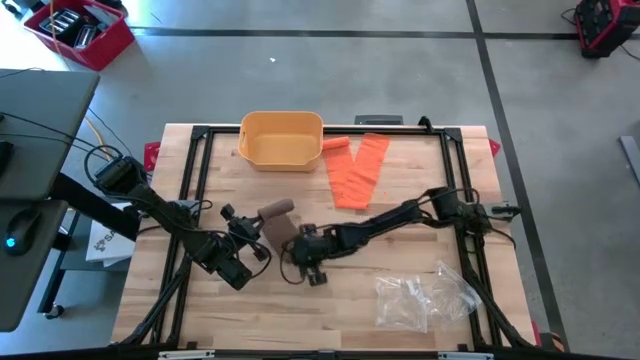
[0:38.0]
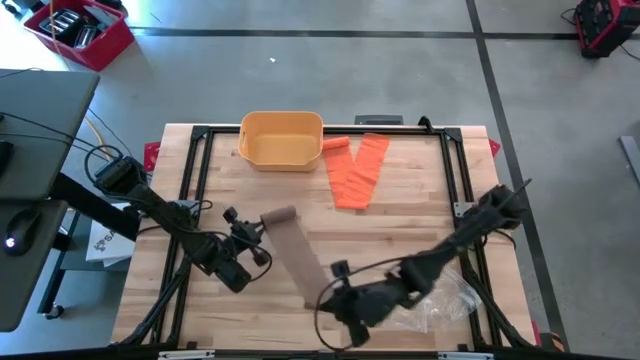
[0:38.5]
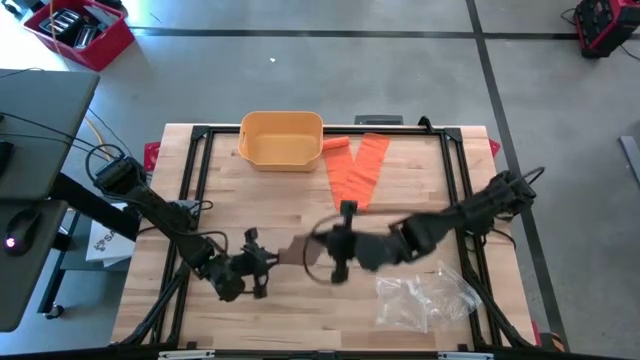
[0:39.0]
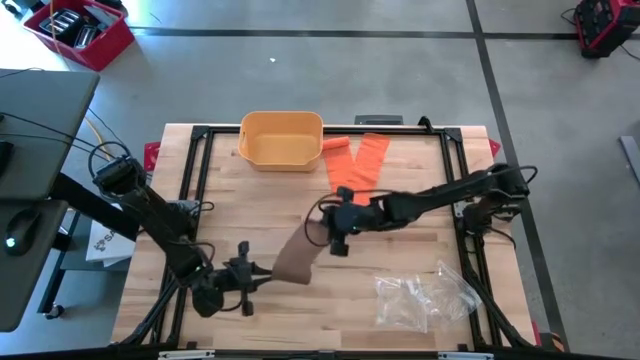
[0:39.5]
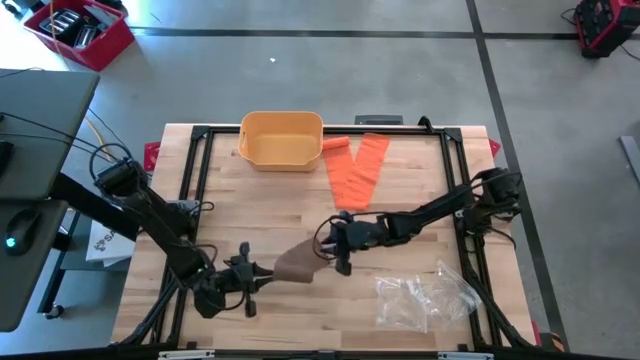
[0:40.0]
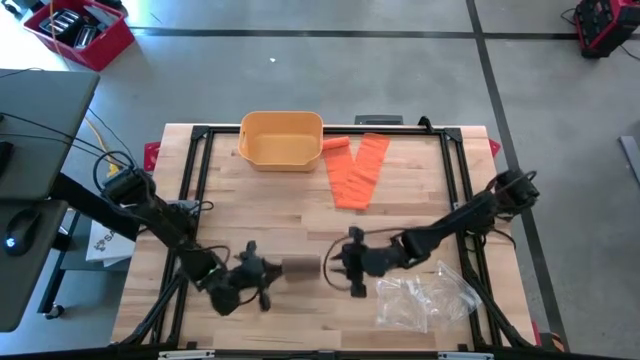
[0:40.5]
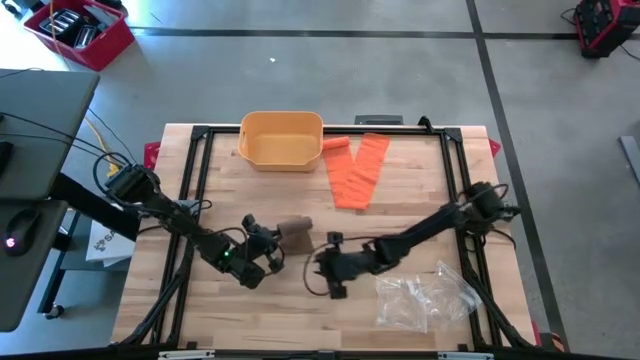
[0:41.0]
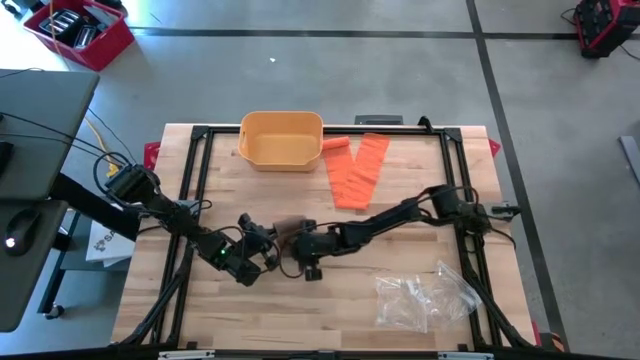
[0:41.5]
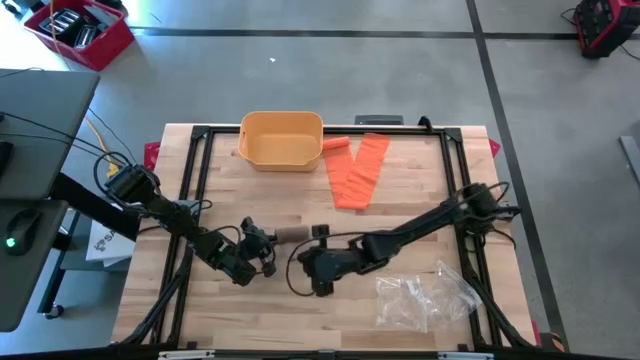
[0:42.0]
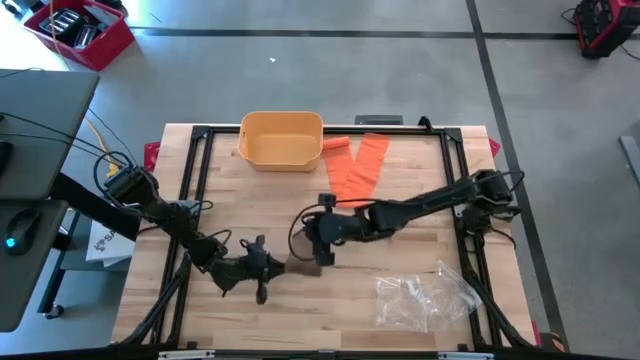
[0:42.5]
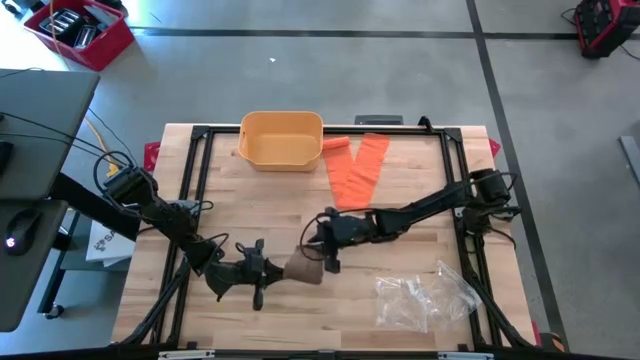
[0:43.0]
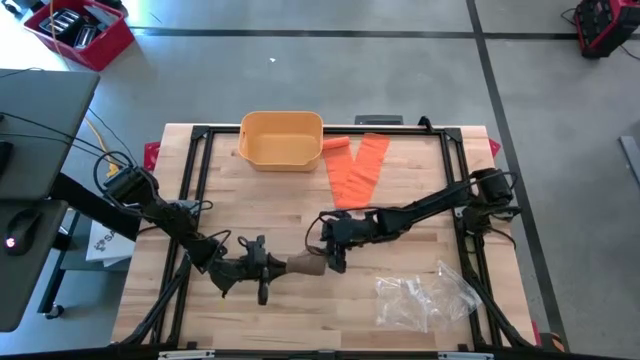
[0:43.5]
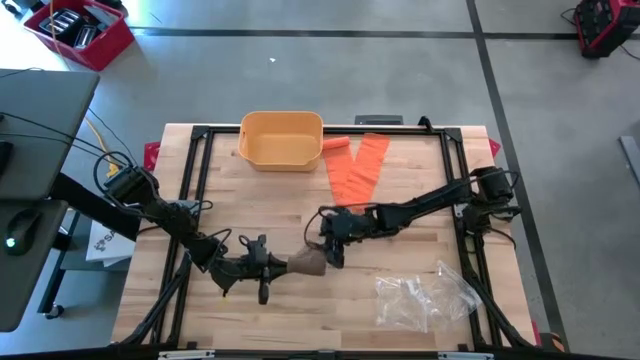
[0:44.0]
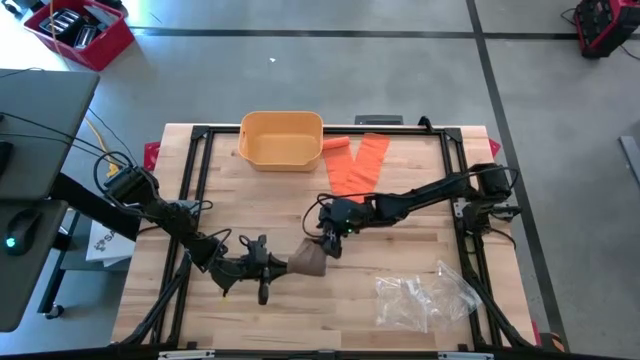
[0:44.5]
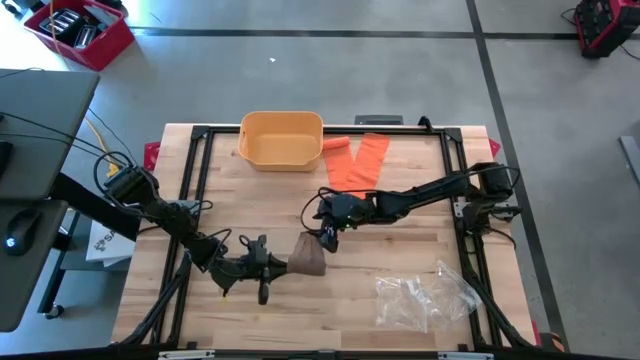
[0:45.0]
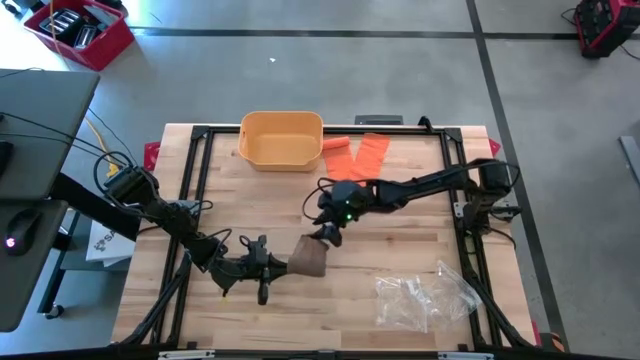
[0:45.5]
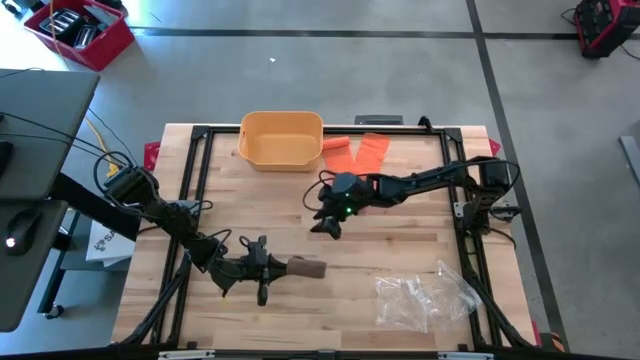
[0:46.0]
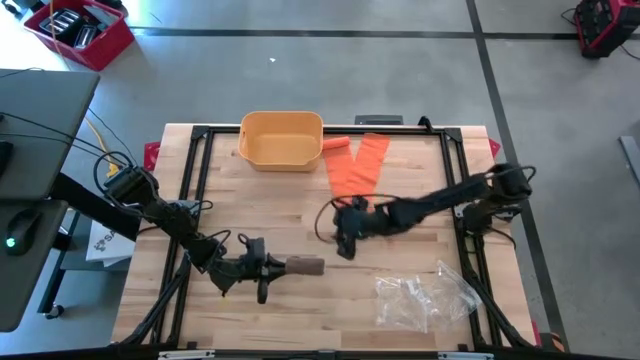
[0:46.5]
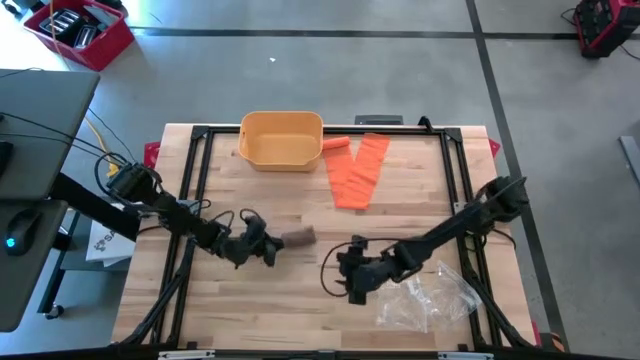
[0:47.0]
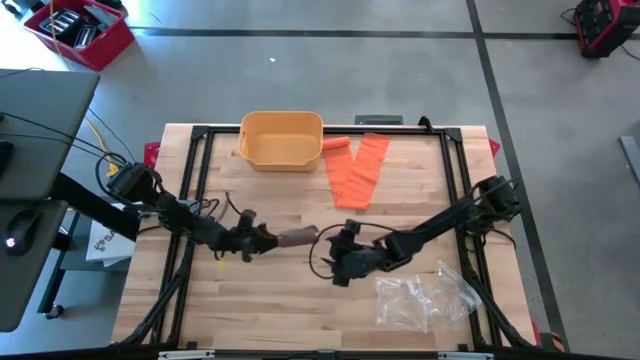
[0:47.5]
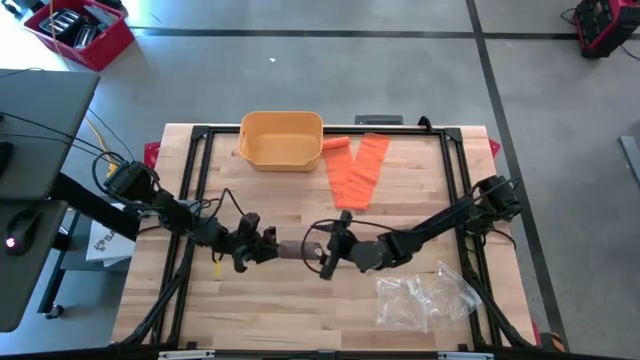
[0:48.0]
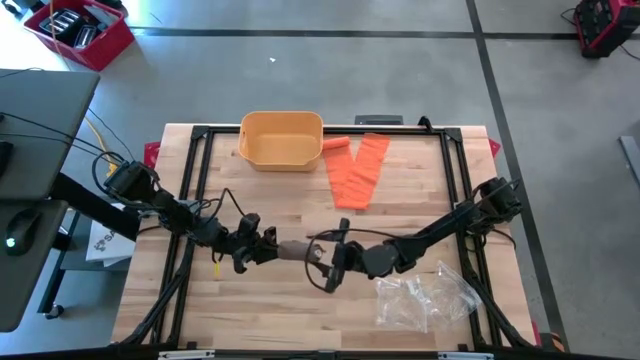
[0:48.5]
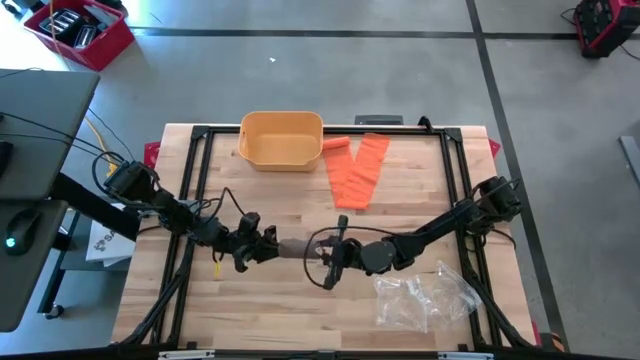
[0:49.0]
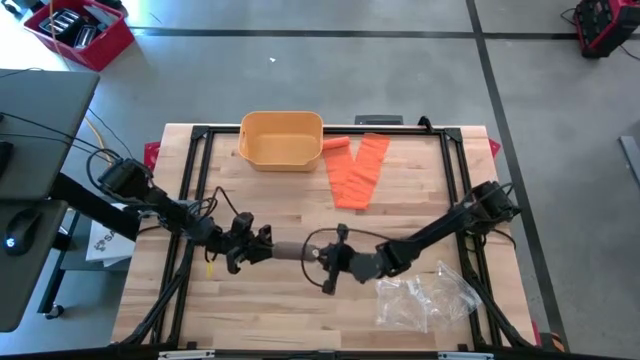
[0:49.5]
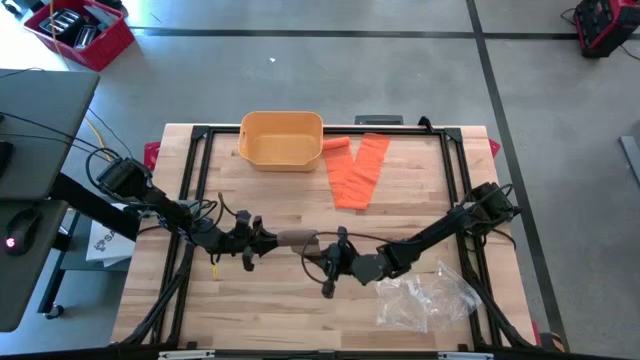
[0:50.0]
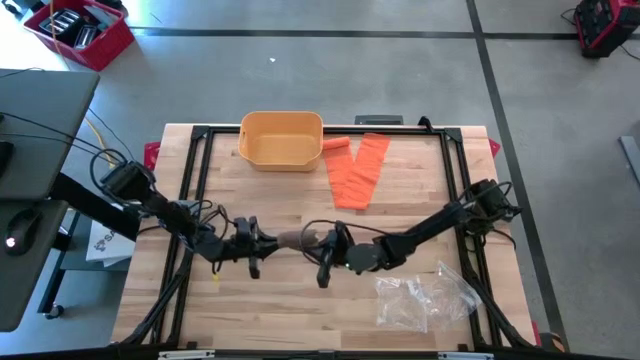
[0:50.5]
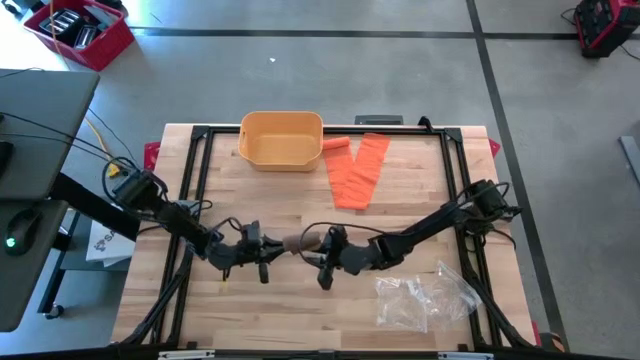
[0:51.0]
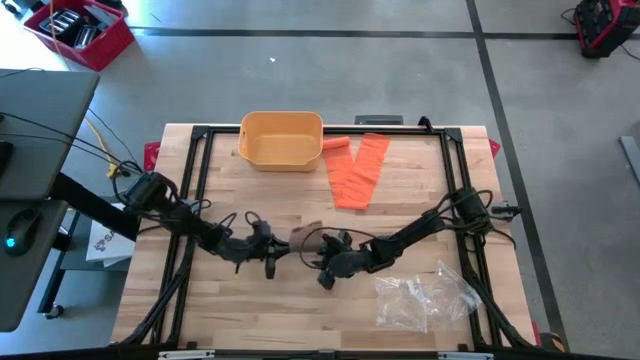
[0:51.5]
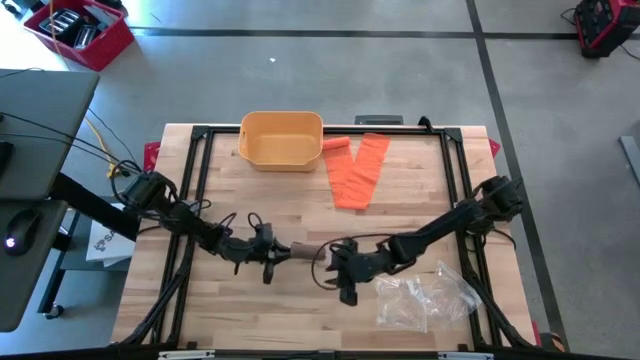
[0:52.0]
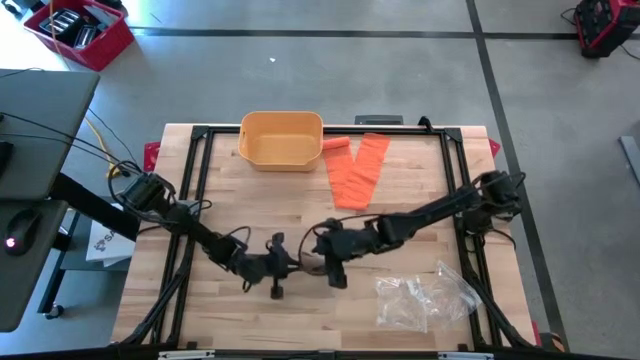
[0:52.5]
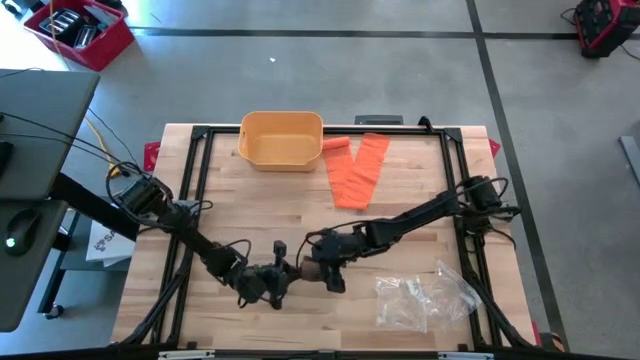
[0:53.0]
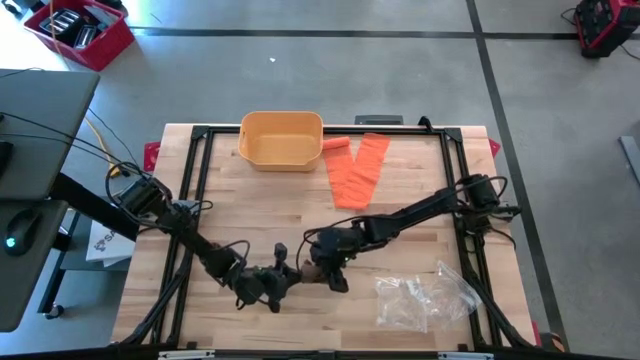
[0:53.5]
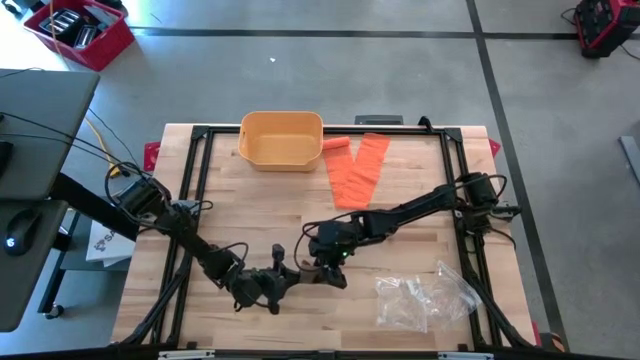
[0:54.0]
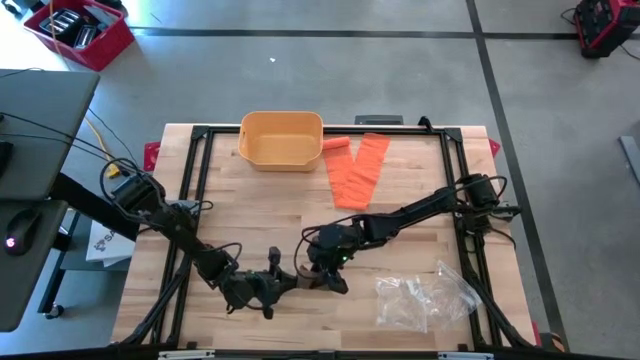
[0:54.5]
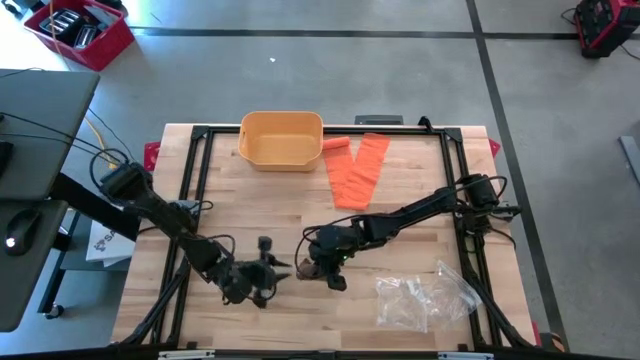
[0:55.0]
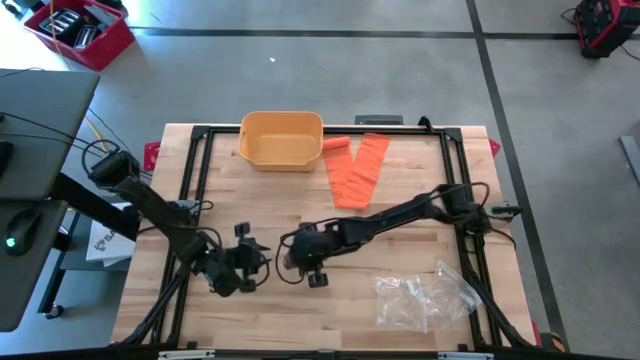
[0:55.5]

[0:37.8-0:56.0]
Task: Roll bandage
Roll the brown bandage

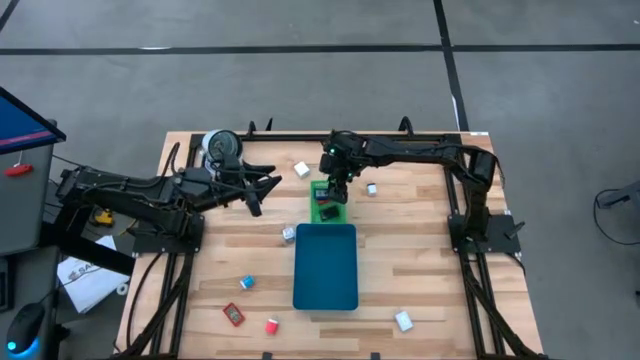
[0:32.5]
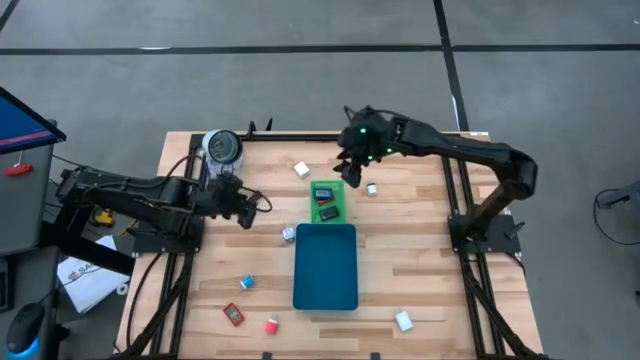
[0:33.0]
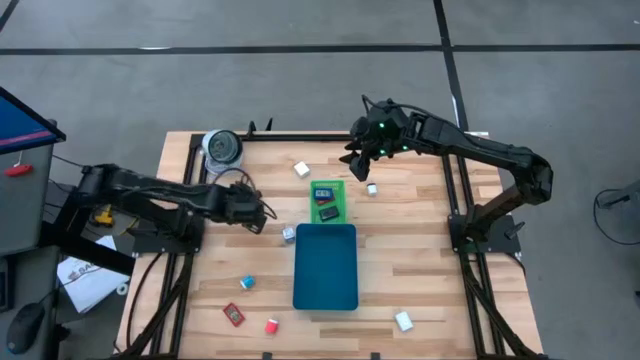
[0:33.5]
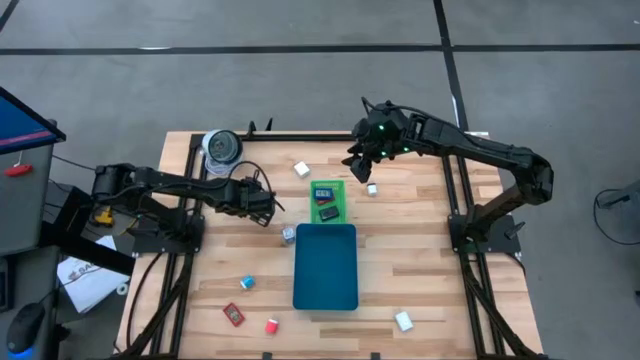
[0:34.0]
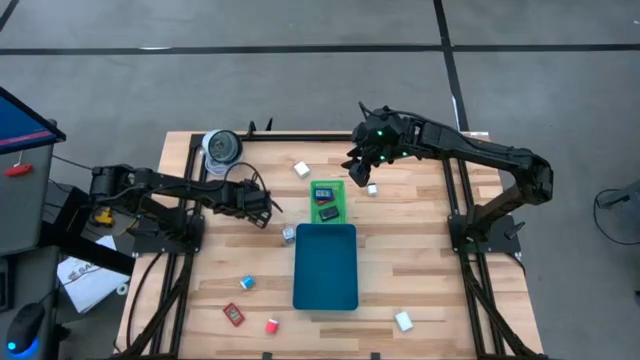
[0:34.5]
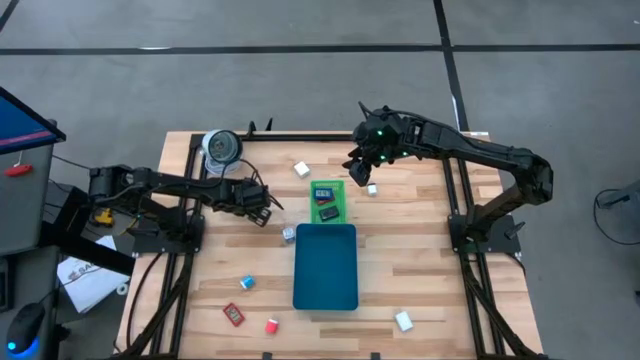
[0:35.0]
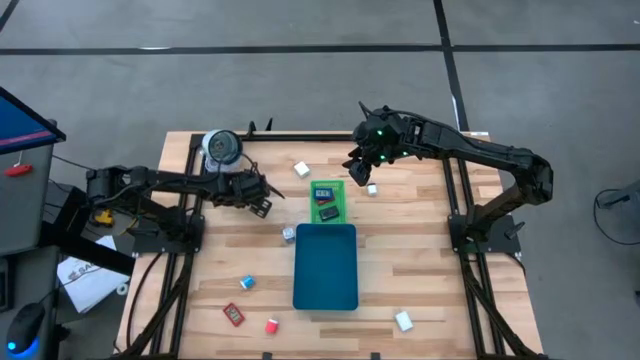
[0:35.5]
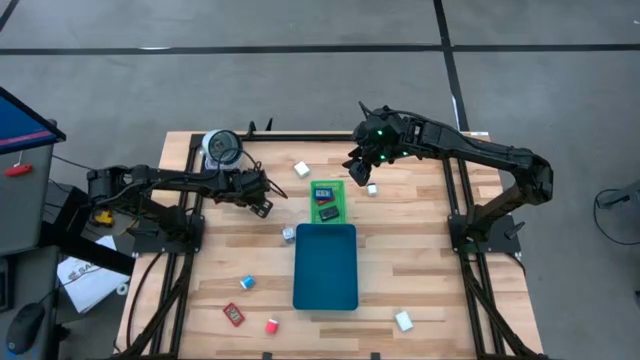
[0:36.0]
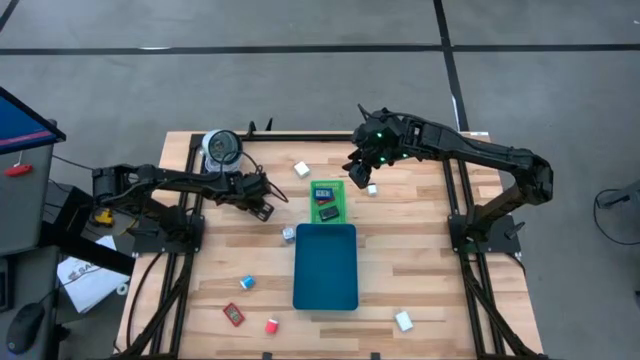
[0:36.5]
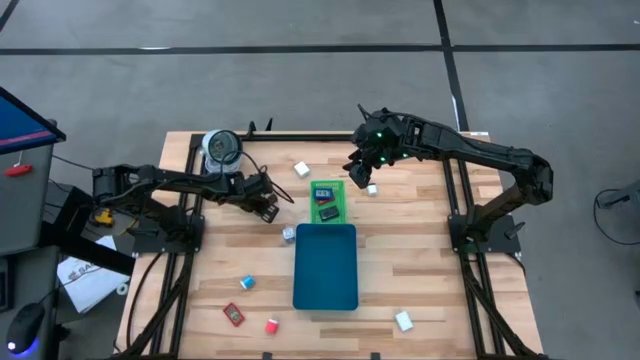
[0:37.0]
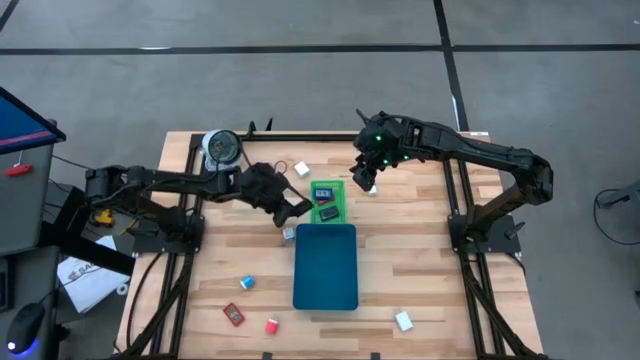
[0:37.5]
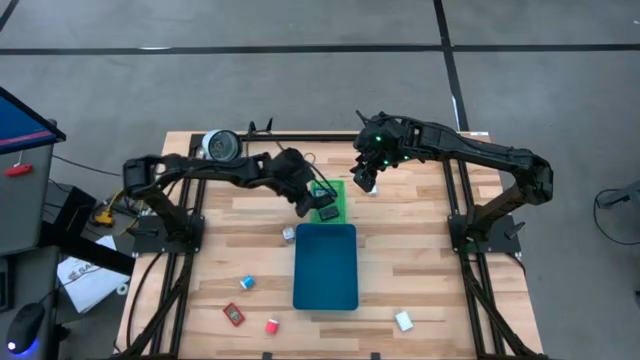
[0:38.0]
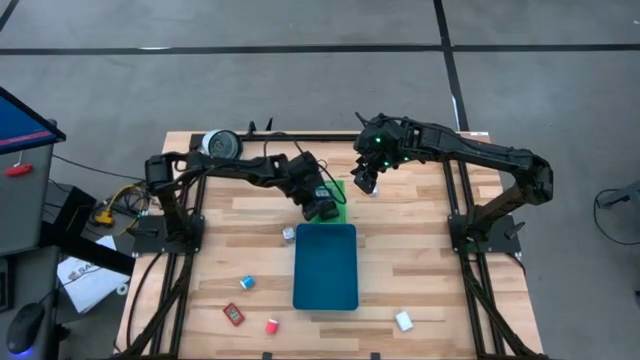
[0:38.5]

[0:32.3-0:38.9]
Task: Pick & Place Office items
Put the black digital clock into the green bin
